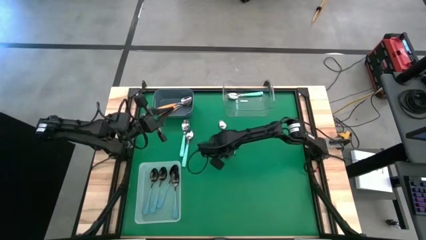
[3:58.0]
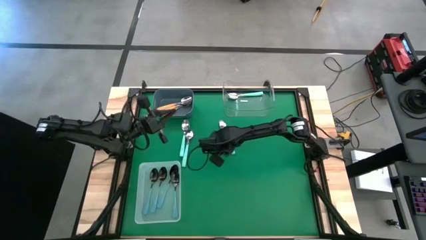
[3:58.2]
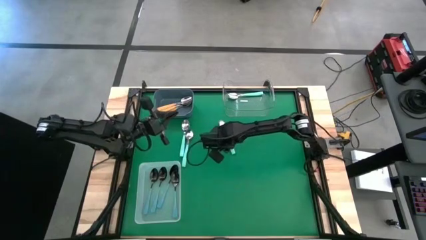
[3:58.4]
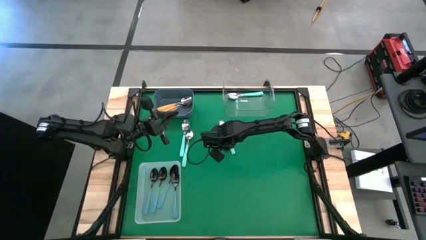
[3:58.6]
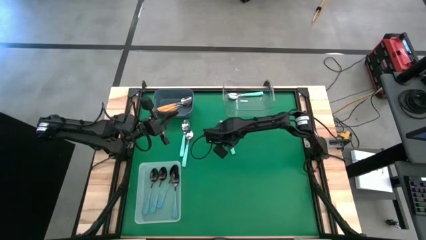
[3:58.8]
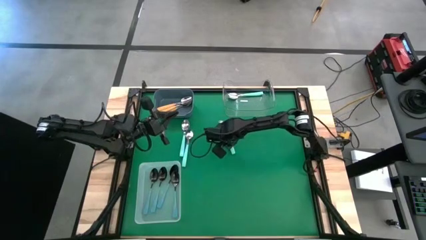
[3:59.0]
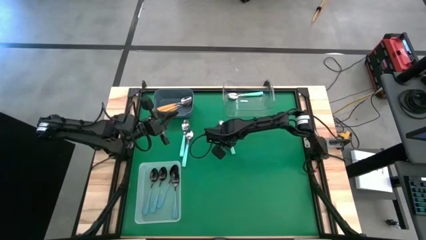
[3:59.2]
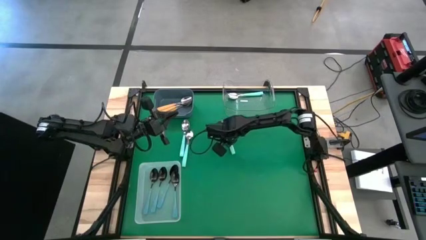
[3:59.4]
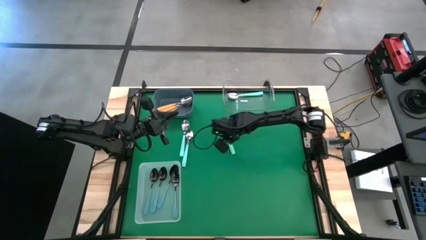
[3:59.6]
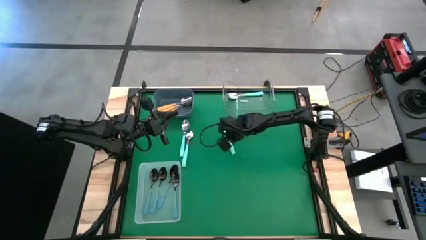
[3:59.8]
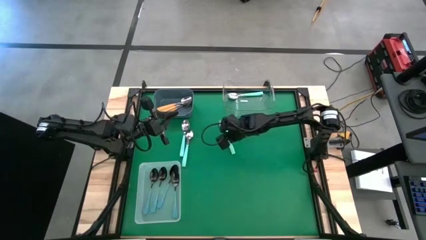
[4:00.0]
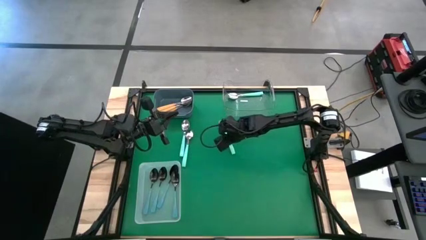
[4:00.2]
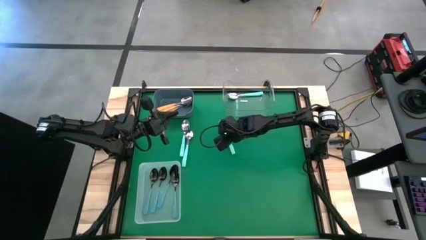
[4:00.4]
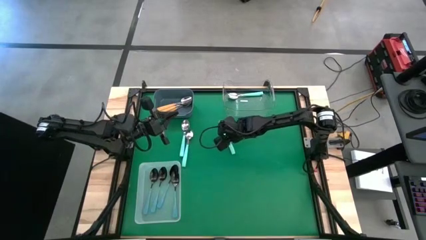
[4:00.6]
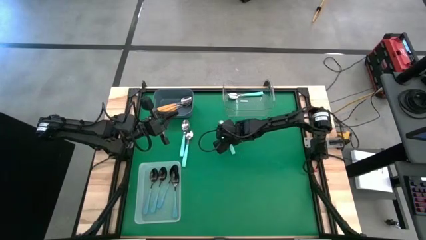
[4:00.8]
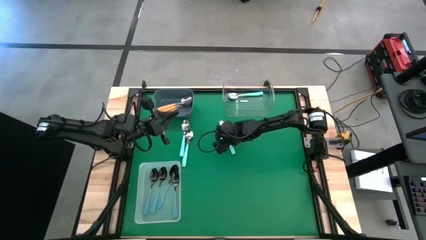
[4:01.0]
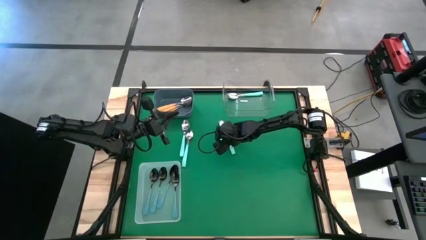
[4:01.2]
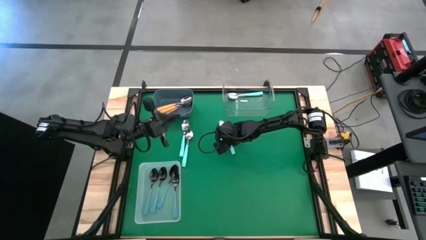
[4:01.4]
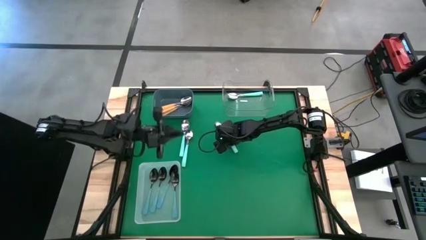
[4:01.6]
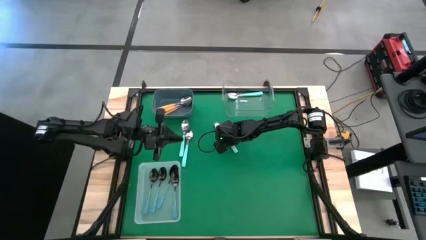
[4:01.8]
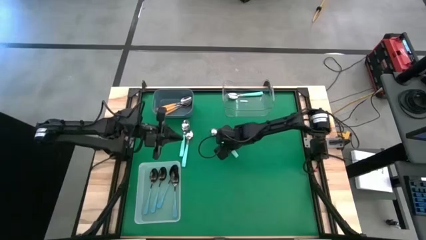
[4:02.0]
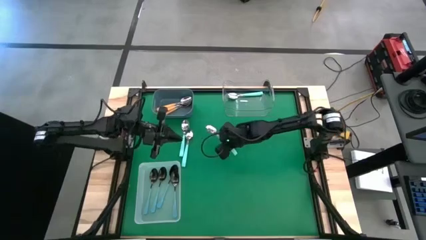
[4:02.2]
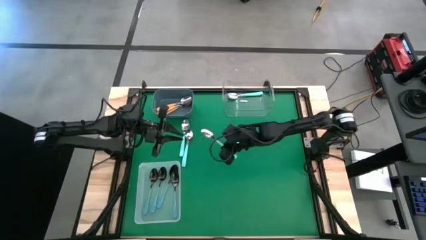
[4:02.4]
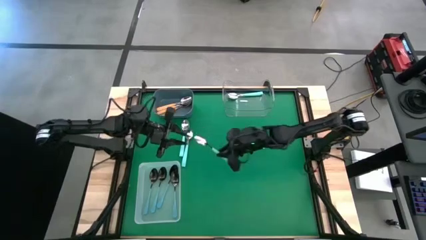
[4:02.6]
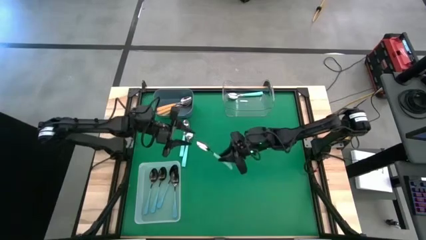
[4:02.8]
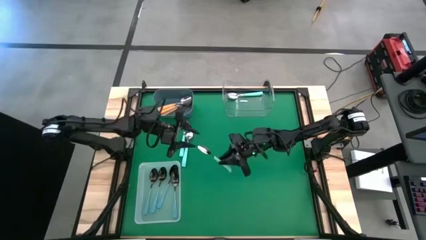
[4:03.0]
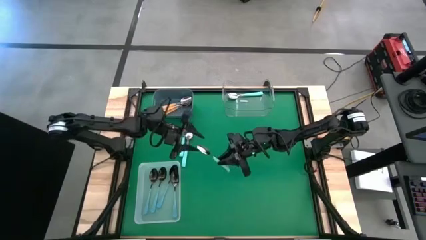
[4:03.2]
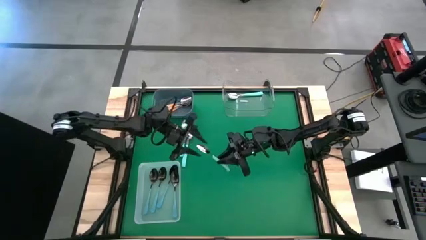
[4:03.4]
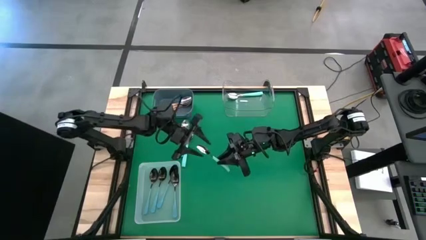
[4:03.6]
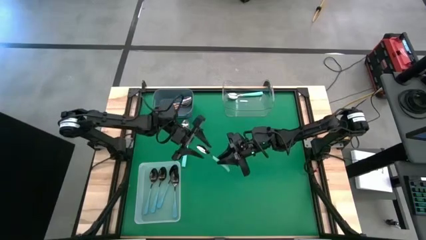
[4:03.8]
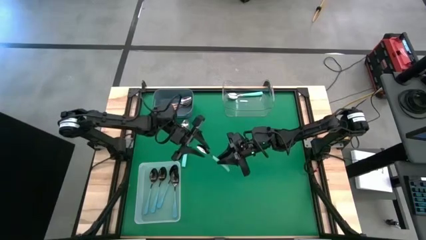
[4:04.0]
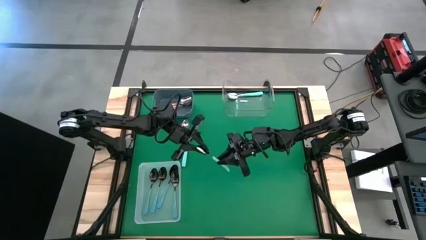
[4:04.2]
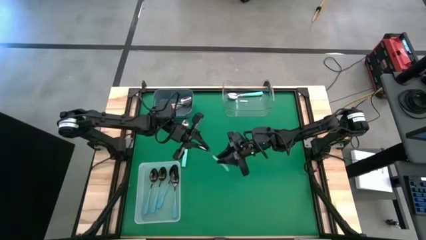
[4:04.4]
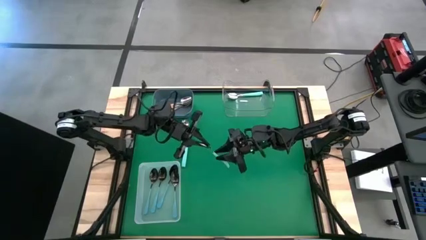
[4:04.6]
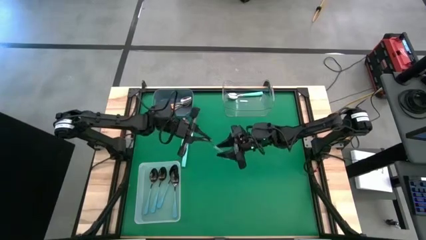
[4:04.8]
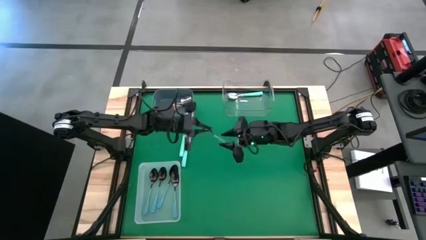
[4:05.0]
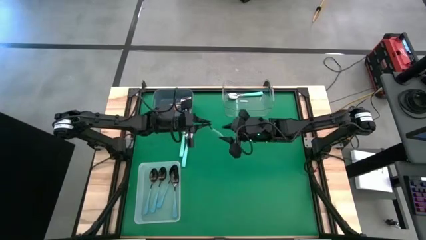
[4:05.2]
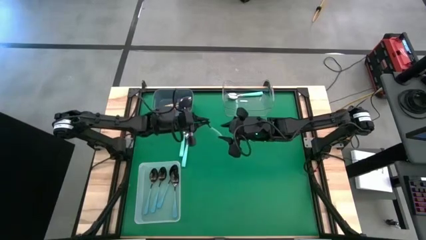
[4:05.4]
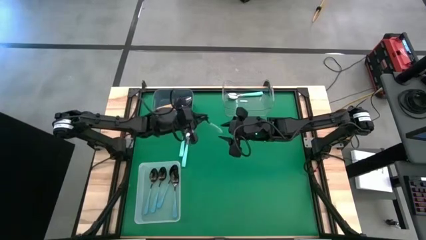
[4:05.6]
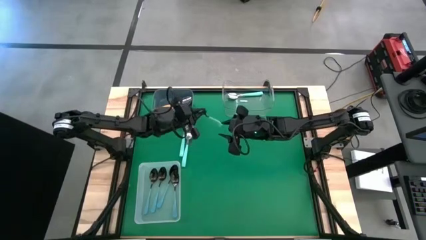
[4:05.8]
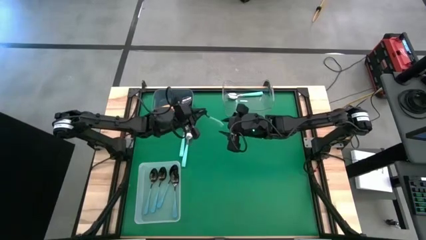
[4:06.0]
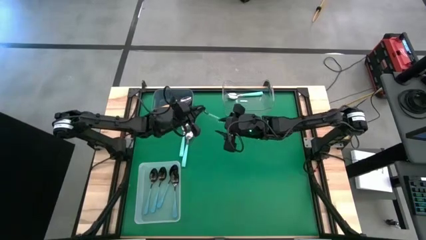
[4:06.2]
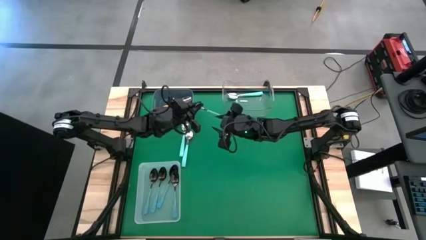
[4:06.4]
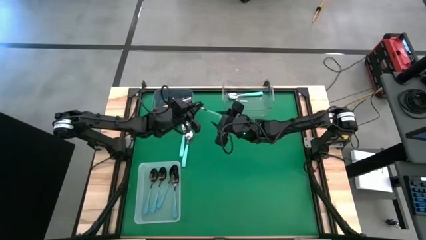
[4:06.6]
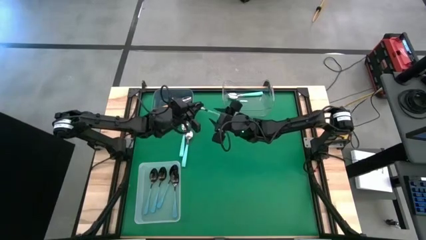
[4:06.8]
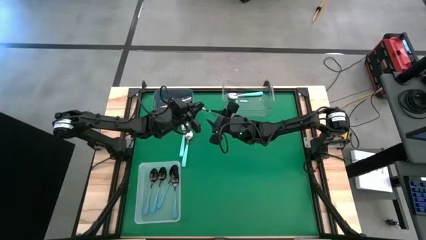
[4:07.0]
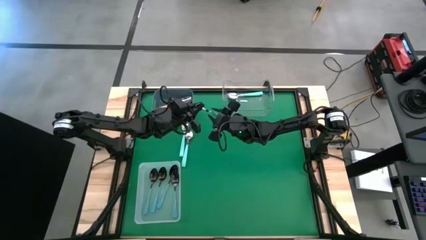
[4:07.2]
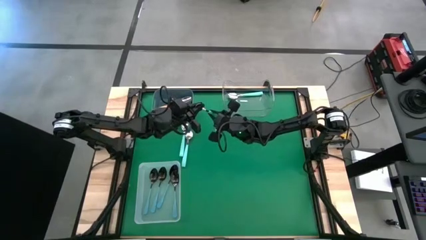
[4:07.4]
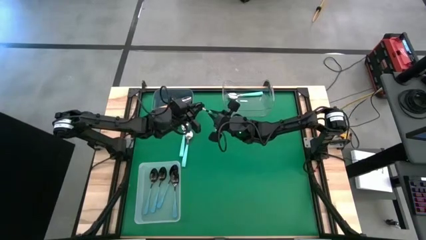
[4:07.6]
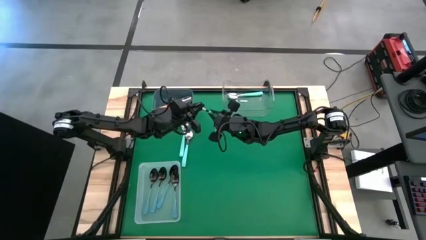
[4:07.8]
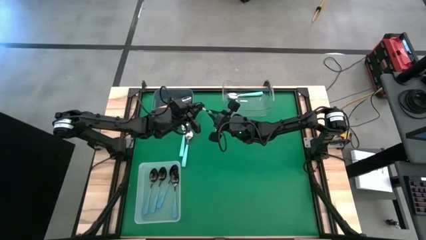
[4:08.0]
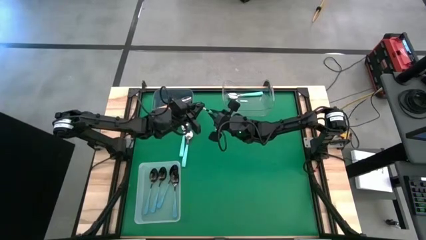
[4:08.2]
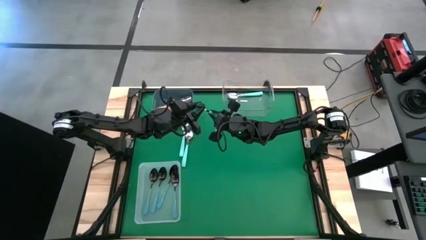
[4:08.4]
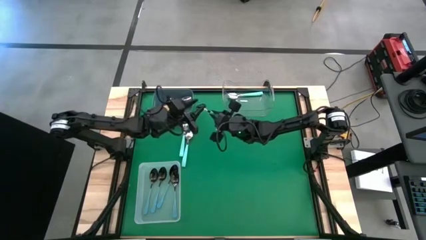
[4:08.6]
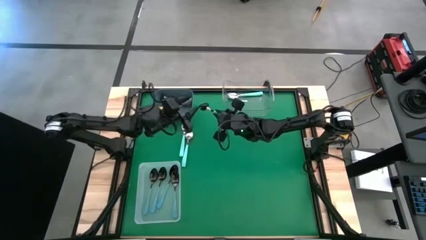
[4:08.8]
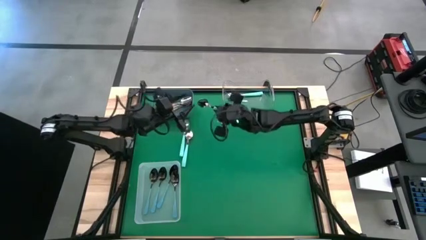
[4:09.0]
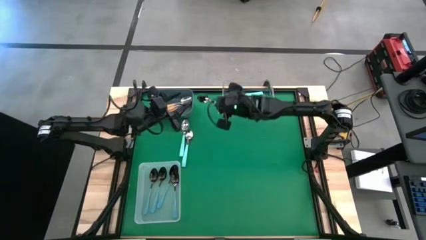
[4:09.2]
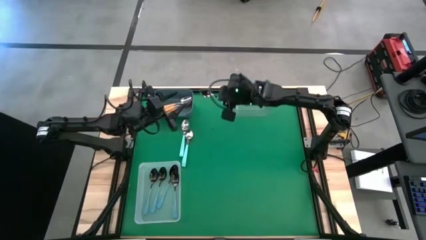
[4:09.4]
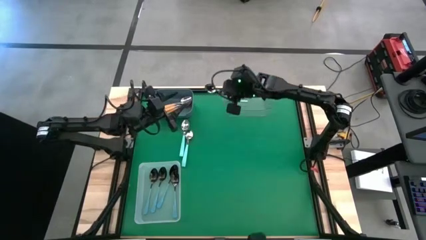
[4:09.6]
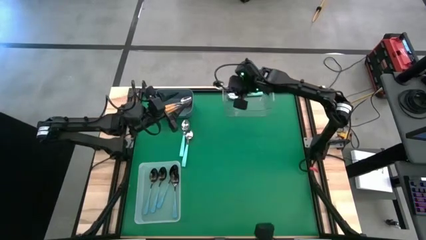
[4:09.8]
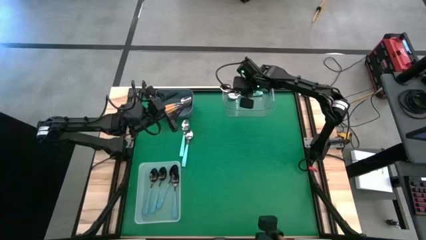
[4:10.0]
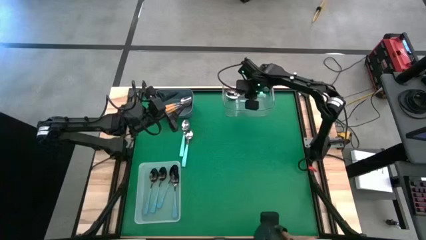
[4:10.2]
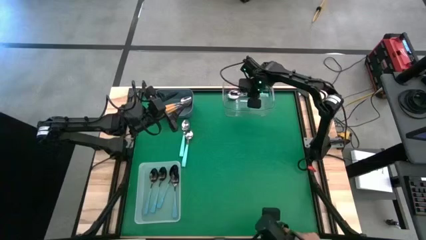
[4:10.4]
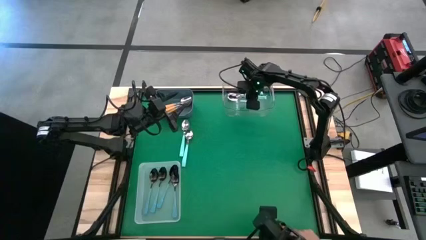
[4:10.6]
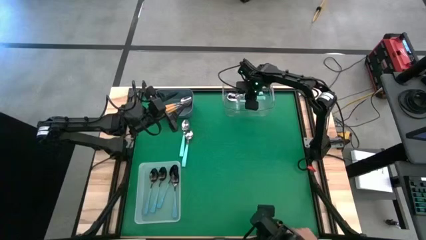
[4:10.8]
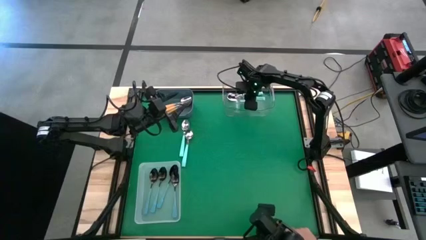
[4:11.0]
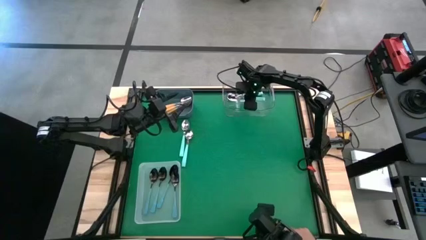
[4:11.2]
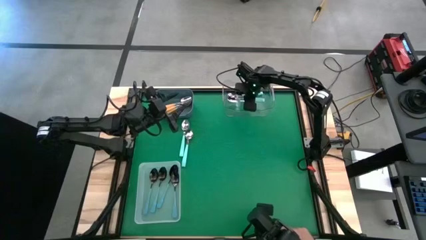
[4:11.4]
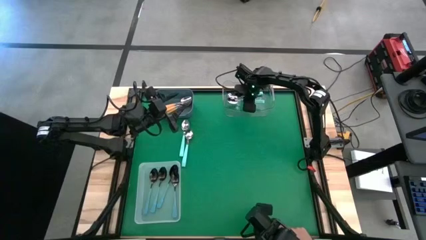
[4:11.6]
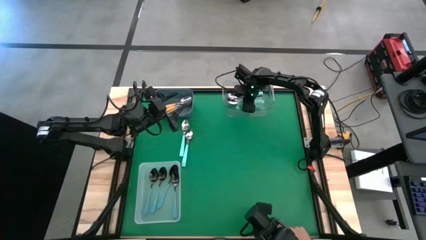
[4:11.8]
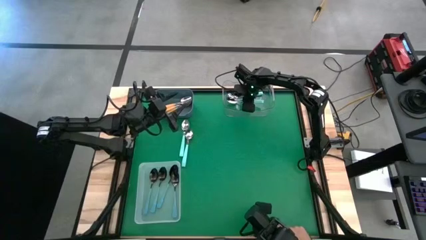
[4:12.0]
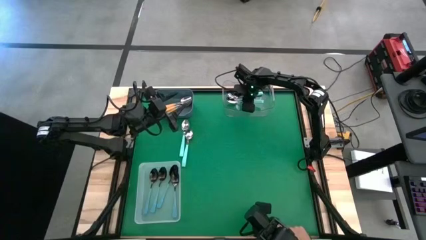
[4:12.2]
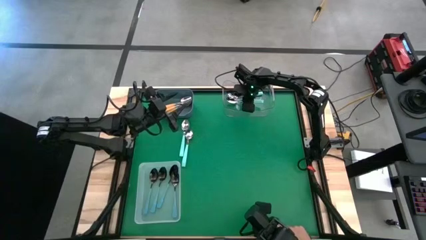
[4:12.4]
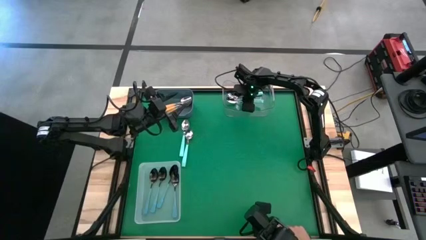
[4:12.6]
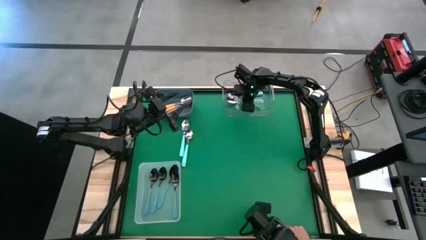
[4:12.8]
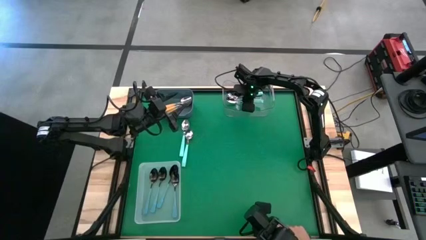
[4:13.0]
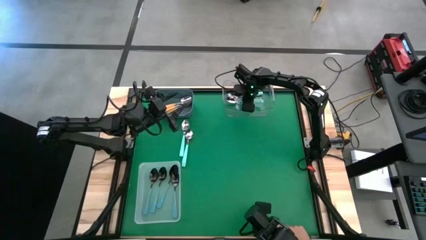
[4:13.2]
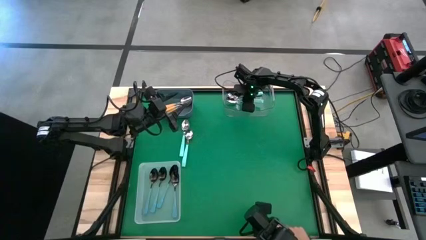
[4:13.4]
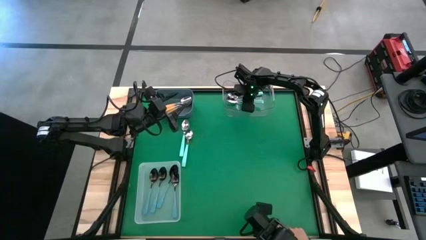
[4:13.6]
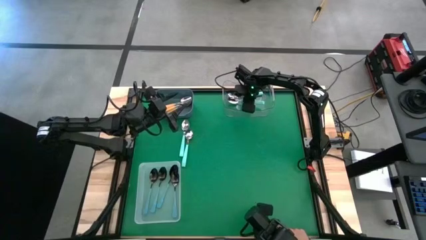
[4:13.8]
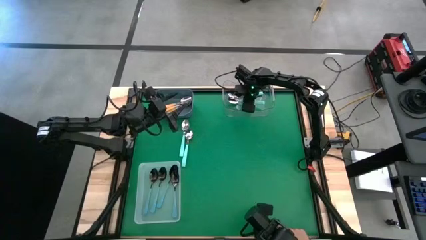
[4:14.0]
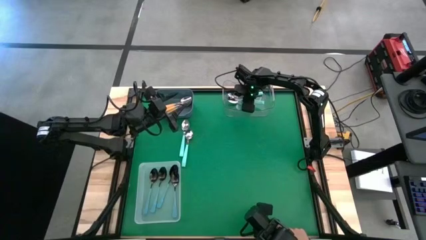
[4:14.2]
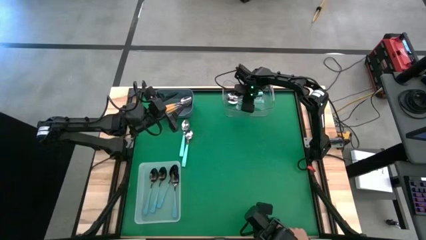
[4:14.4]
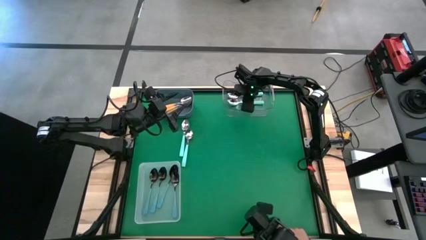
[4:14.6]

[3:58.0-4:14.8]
Task: Sort silverware by color (type)
Put the light blue spoon into the transparent bin
